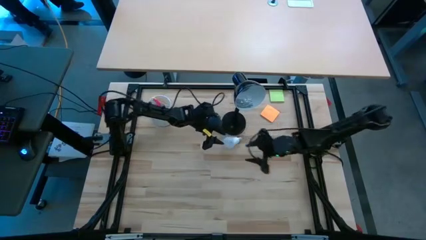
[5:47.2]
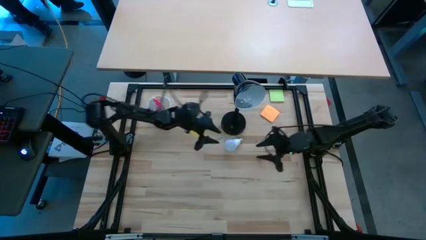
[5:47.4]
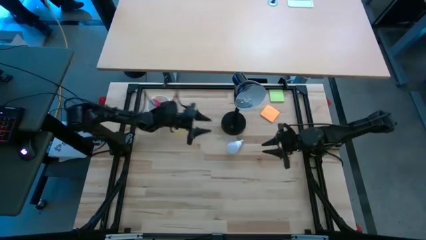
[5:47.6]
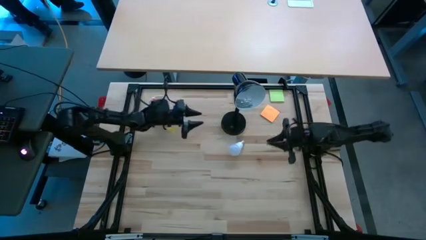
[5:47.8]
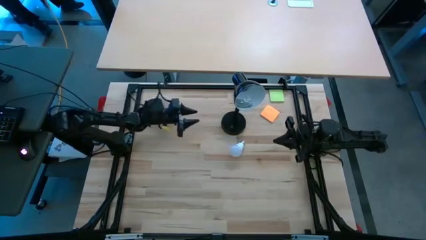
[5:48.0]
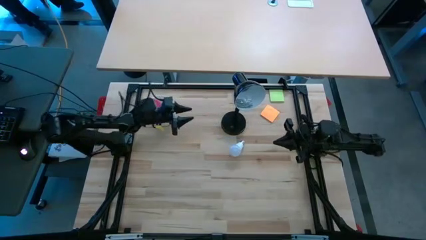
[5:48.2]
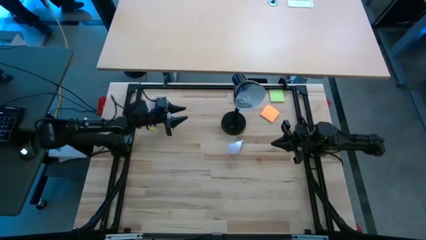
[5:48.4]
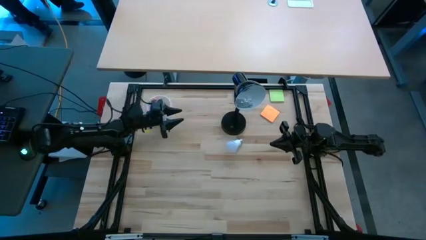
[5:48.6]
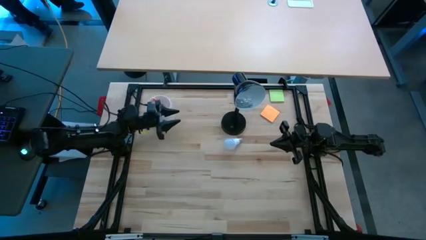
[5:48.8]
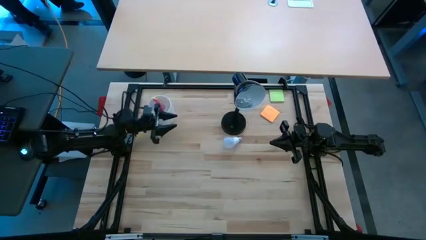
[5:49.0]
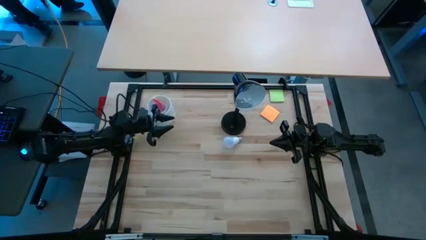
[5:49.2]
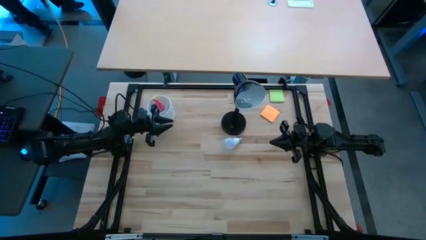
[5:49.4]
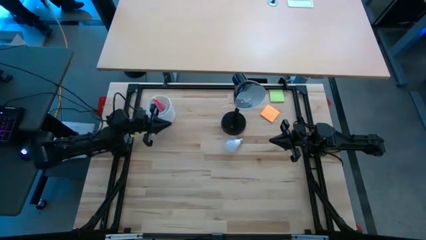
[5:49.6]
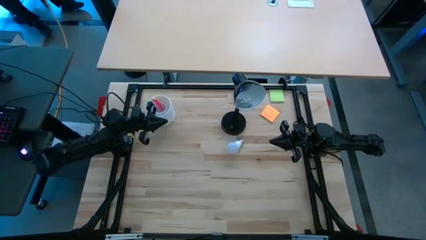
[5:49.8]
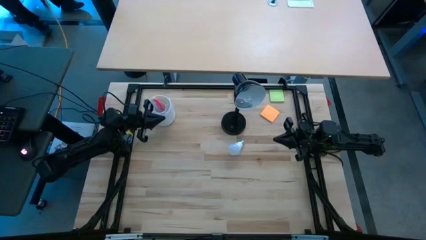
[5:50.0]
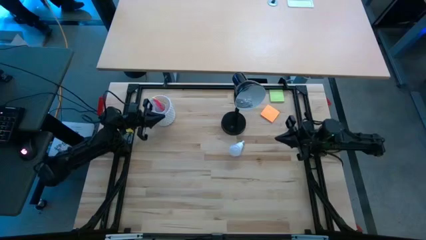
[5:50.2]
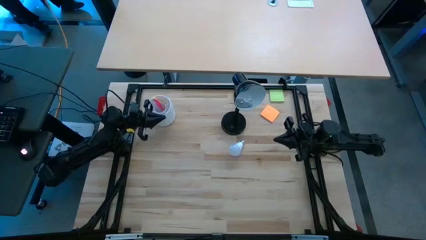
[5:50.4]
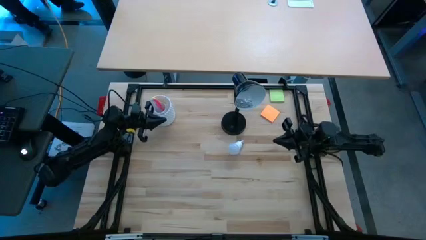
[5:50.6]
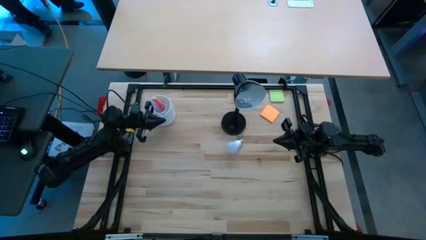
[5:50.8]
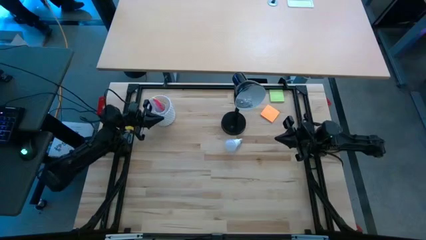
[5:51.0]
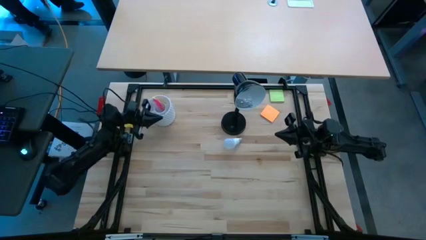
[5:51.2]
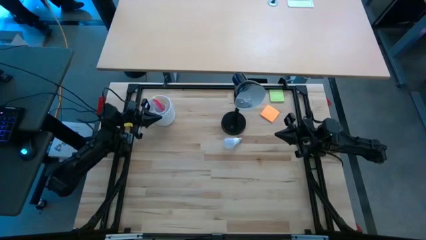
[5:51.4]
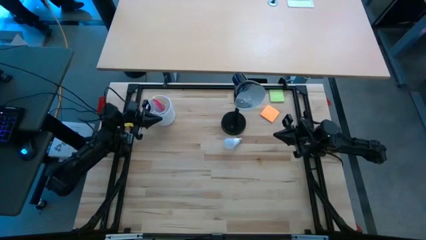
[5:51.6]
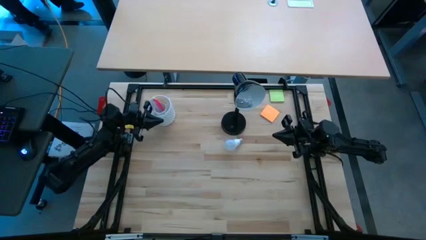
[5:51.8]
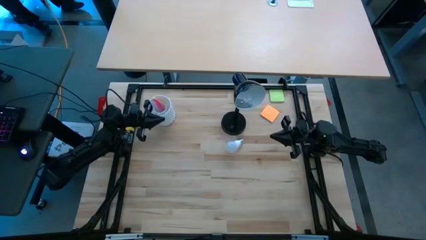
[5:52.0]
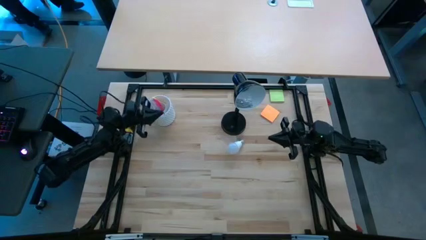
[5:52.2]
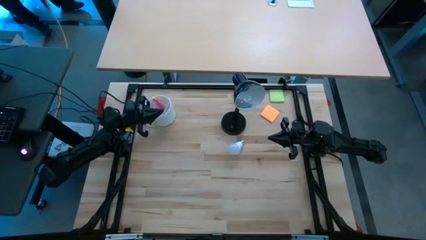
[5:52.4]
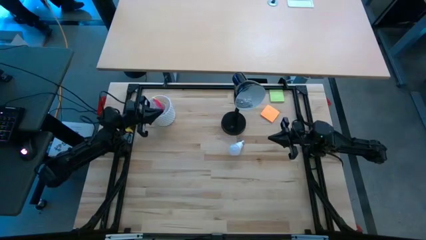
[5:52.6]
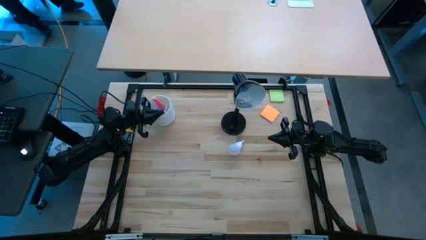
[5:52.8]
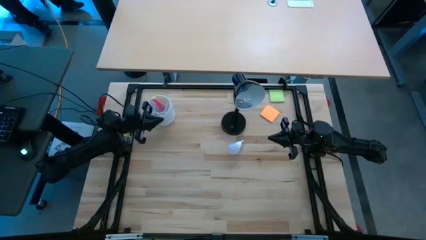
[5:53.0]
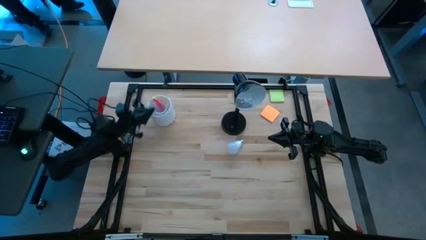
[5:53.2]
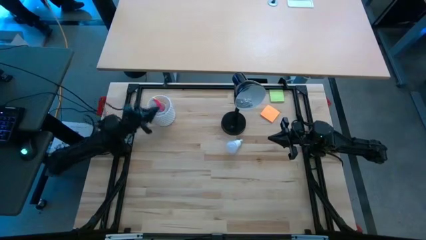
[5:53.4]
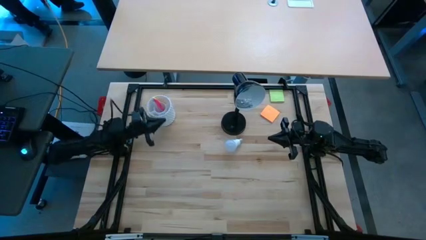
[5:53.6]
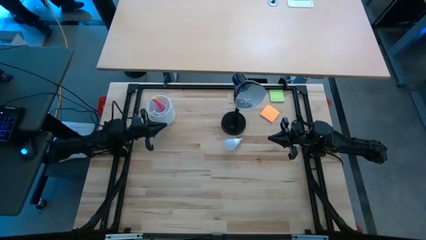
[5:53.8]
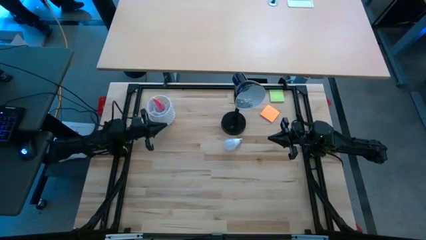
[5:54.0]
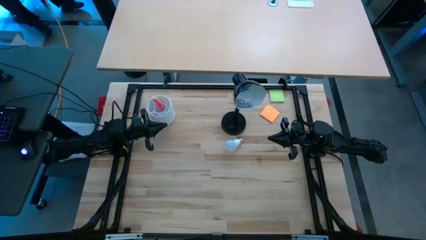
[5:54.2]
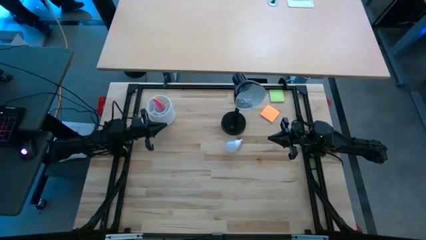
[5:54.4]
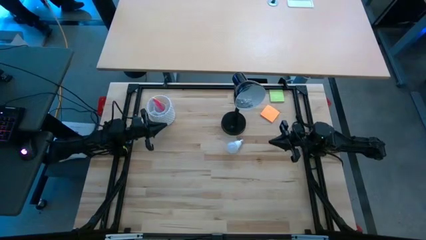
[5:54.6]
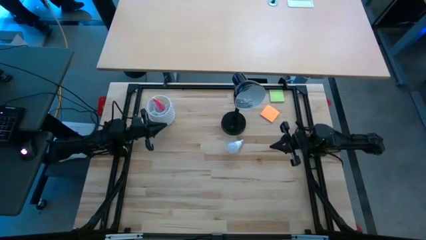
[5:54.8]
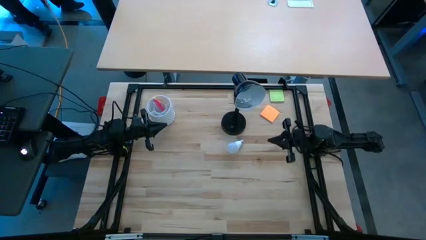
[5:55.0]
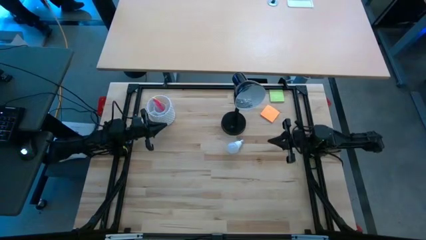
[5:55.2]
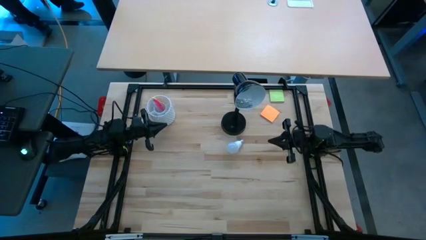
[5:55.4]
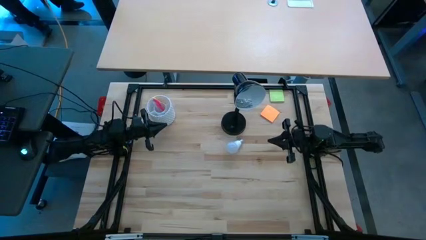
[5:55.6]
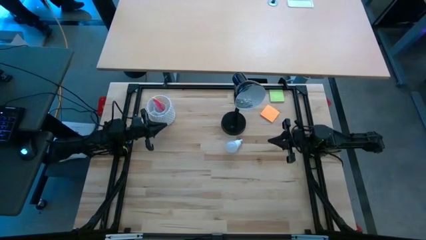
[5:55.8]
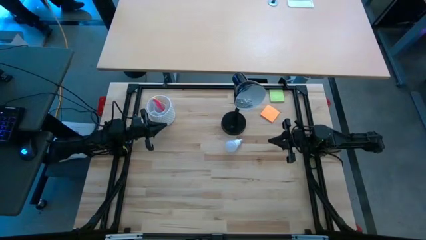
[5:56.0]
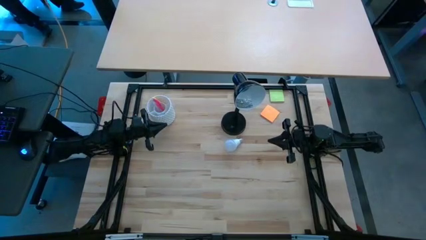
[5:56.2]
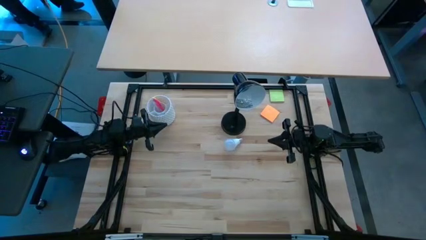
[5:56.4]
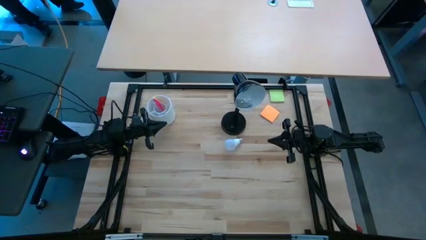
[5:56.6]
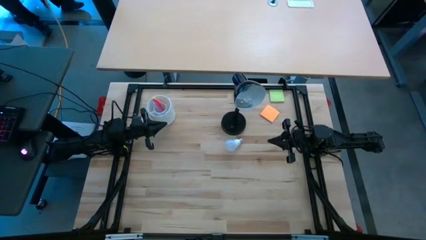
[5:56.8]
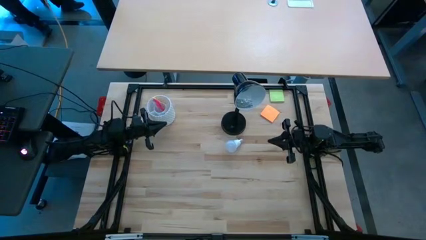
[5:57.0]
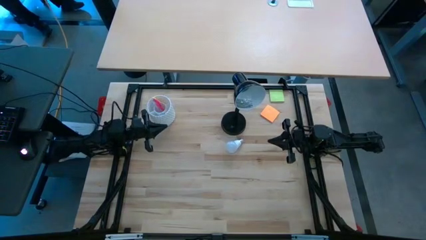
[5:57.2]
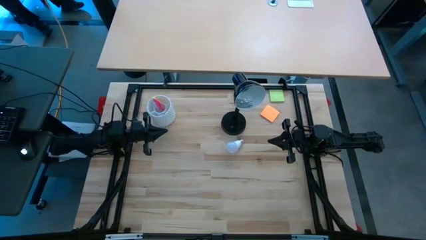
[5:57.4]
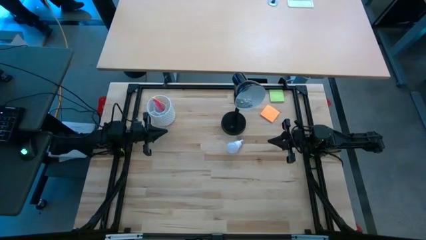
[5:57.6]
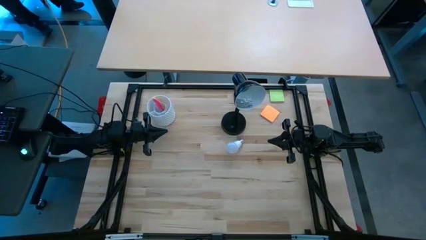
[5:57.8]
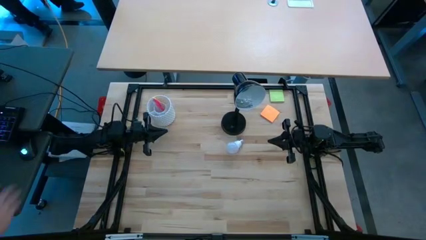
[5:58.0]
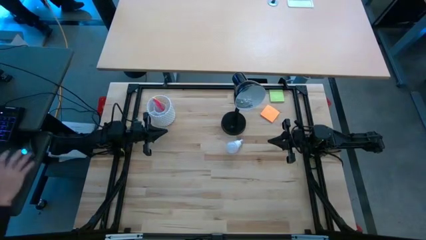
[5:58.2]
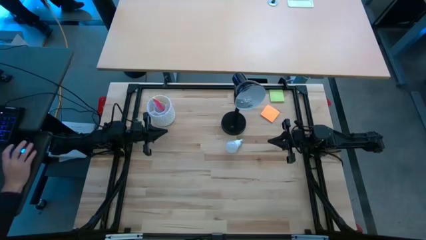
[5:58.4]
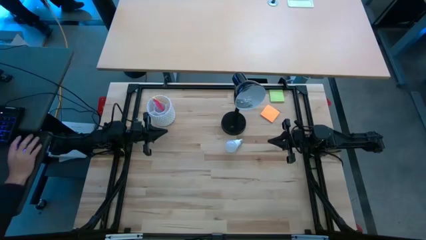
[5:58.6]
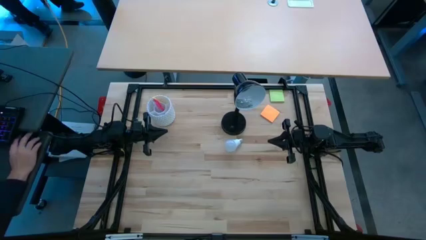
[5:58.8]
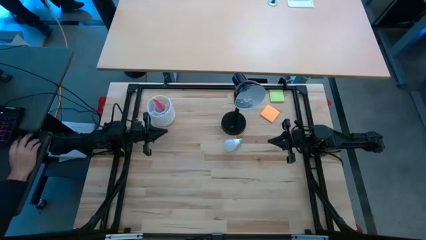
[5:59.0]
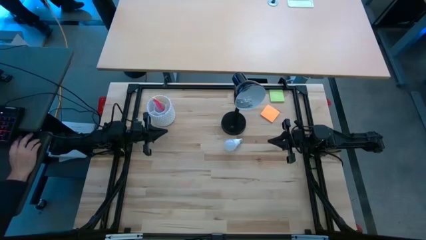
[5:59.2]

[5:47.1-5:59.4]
Task: Screw lightbulb
Return to Home Position

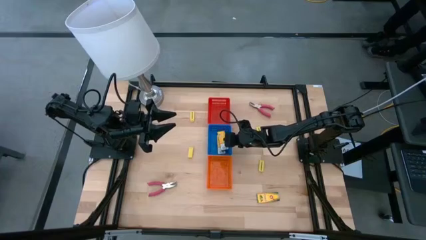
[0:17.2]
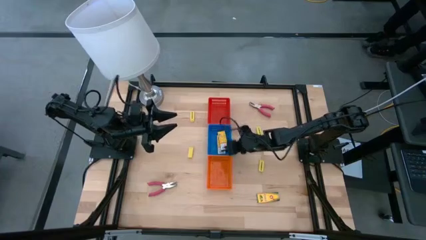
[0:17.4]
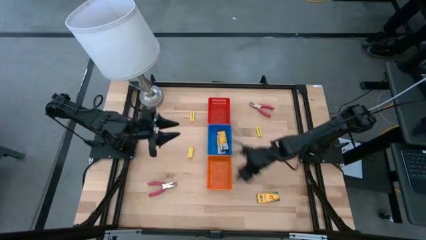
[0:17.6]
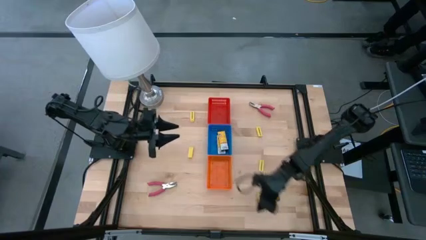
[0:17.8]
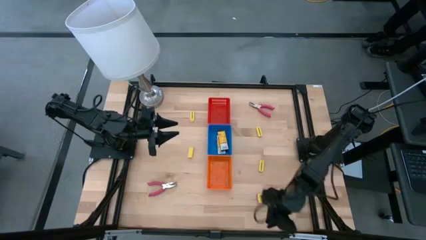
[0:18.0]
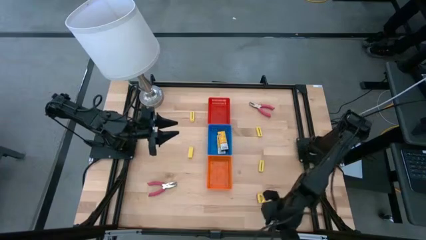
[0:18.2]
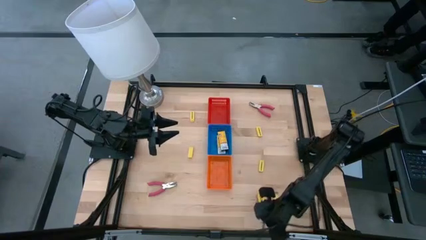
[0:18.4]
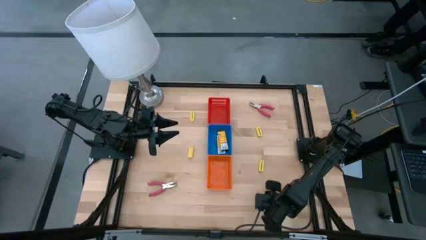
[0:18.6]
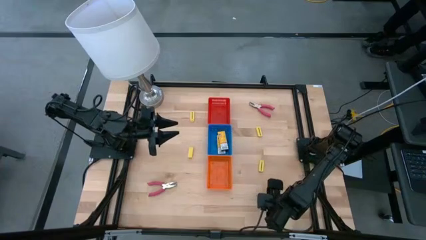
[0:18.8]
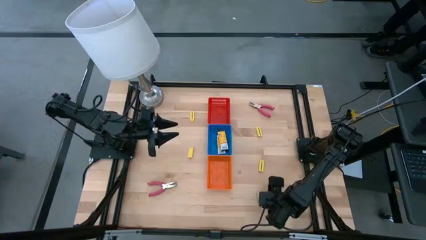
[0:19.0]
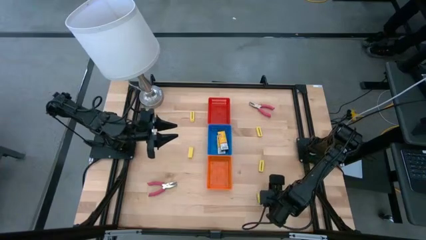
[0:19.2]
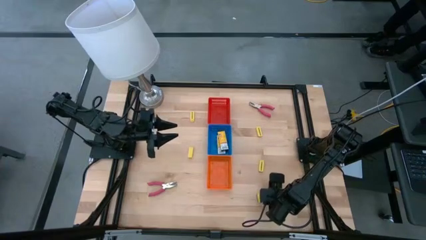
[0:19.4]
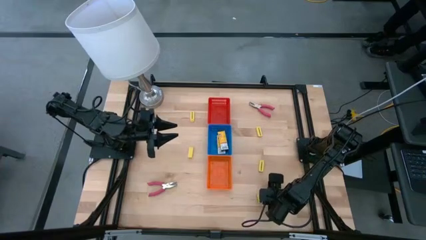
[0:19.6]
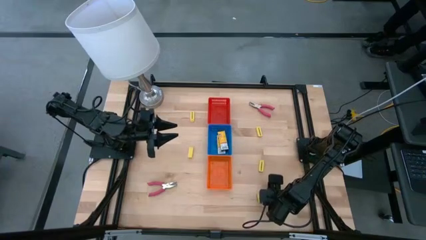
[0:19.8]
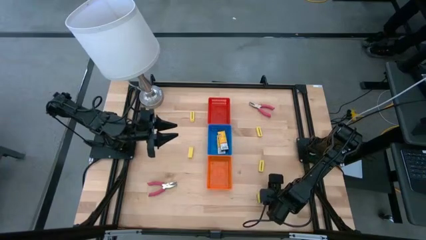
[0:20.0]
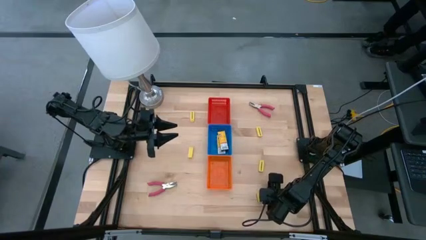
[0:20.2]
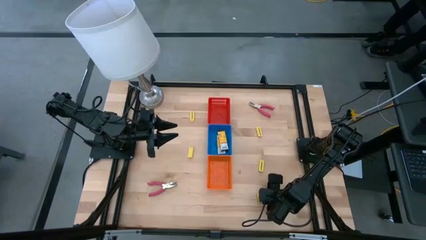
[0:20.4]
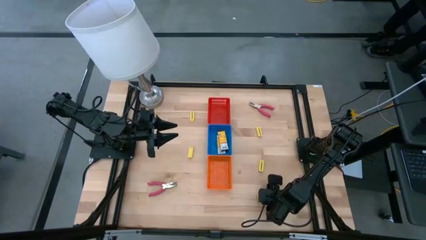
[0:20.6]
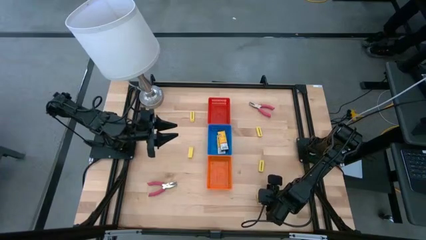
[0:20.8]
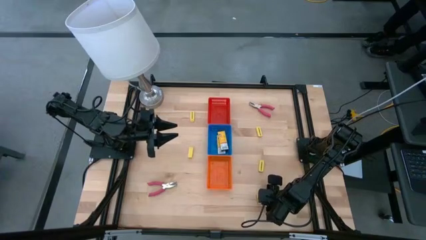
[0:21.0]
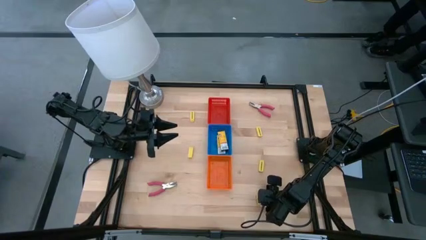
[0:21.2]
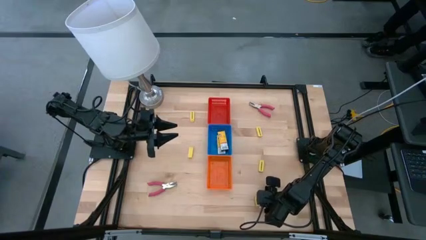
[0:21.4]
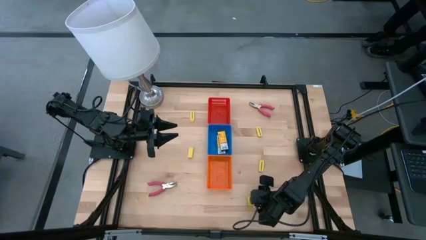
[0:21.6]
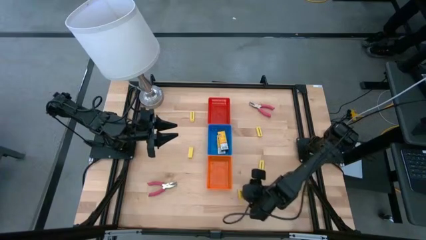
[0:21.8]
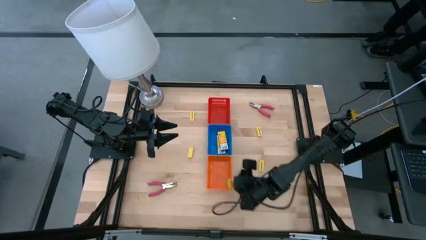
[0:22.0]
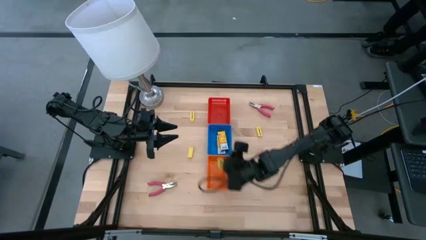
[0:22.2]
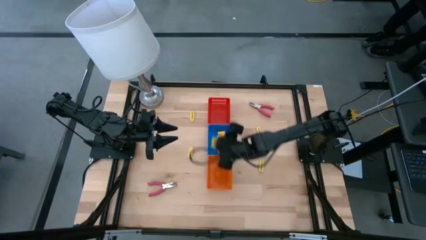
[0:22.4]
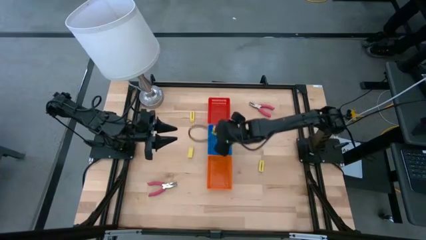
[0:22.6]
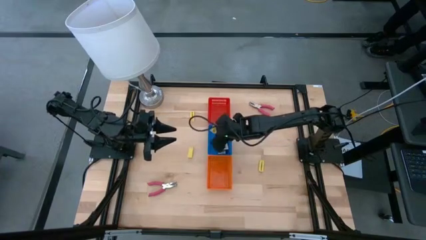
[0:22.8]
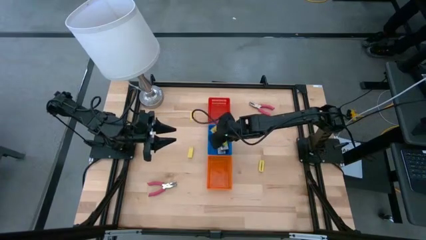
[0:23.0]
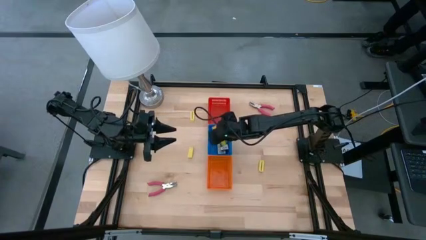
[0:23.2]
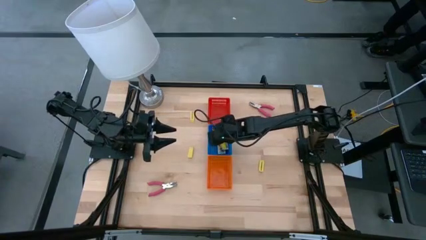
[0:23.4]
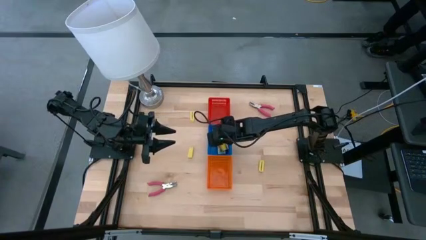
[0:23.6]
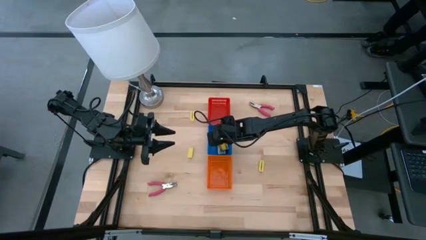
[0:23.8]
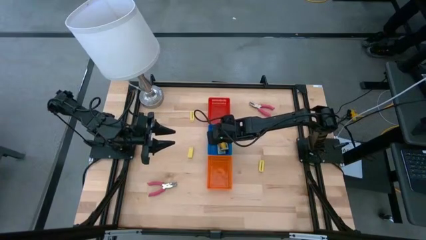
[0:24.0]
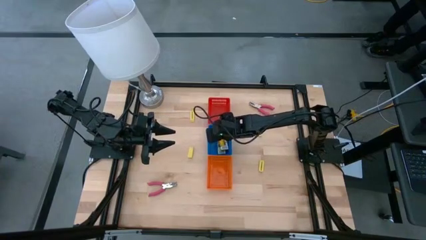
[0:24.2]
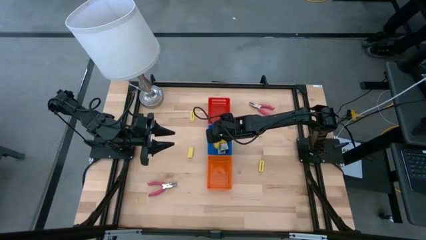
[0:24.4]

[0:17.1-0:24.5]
Task: Pick & Place School Supplies
Put the yellow crayon box into the blue bin
